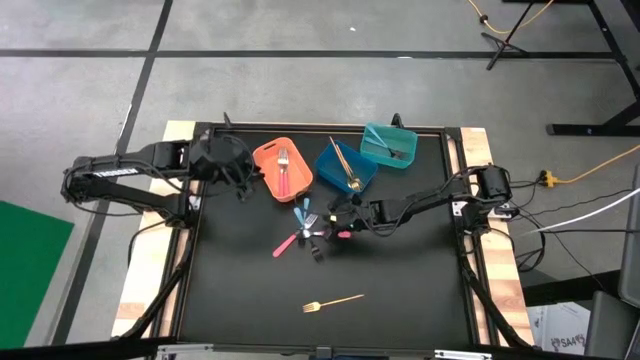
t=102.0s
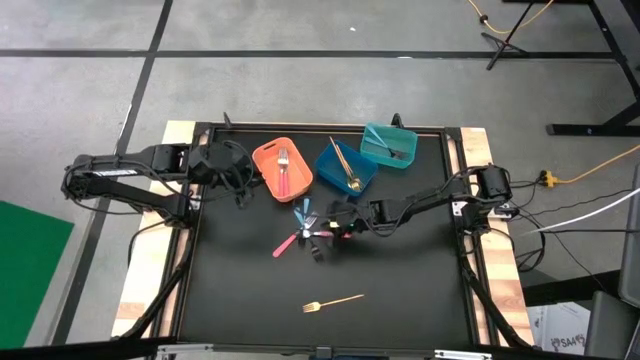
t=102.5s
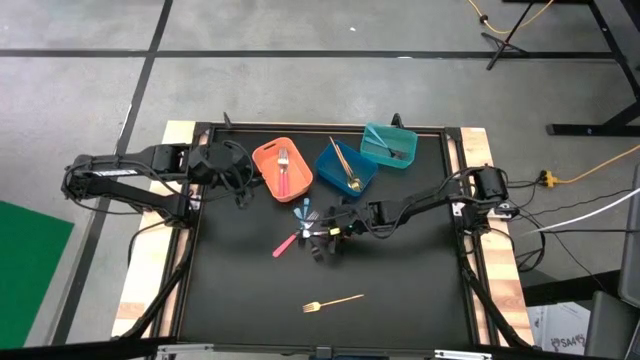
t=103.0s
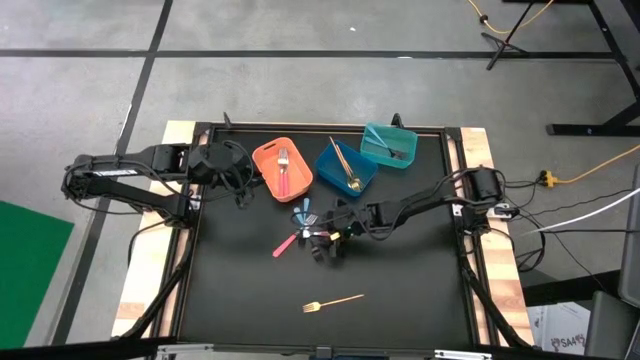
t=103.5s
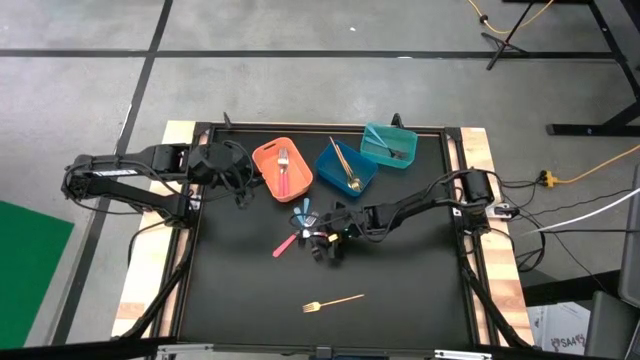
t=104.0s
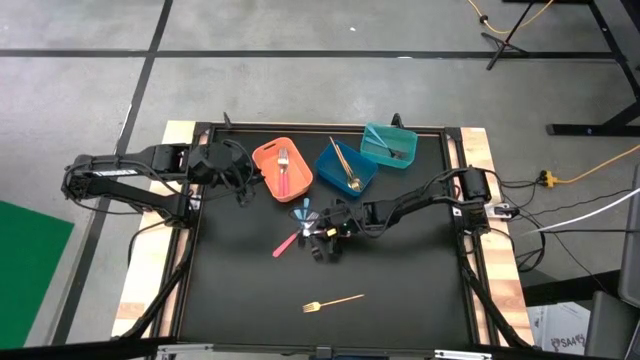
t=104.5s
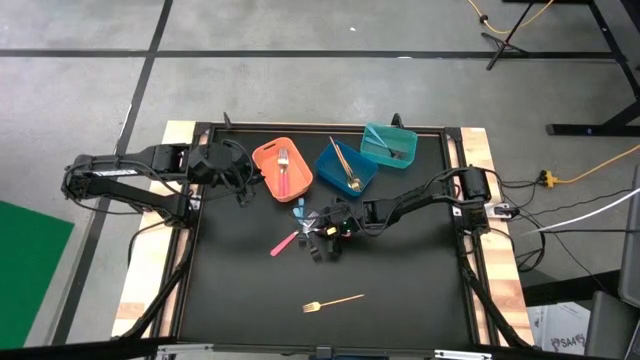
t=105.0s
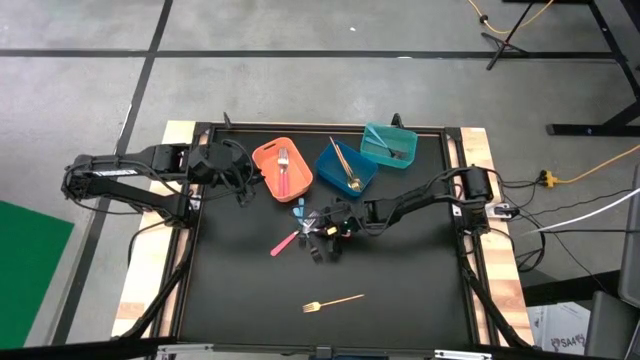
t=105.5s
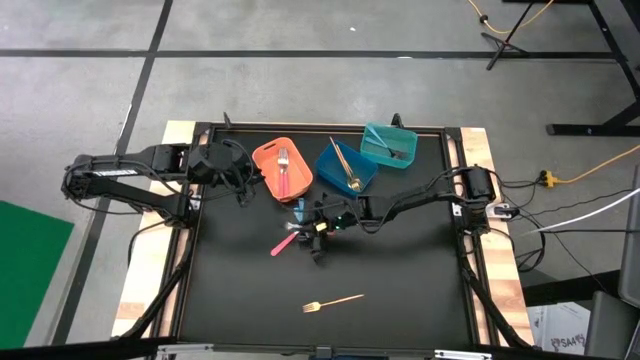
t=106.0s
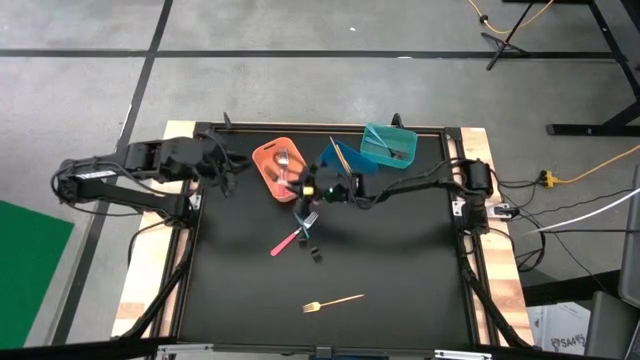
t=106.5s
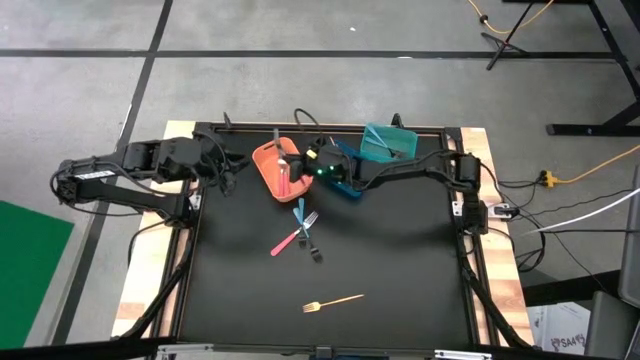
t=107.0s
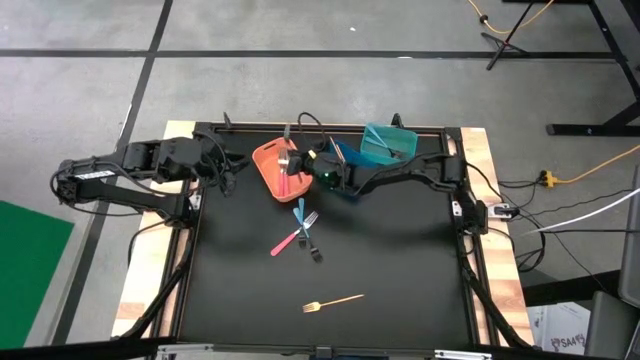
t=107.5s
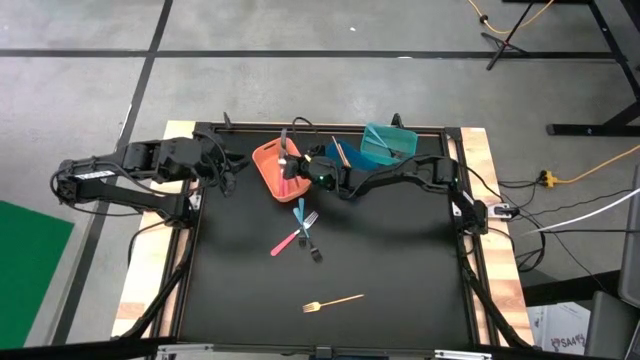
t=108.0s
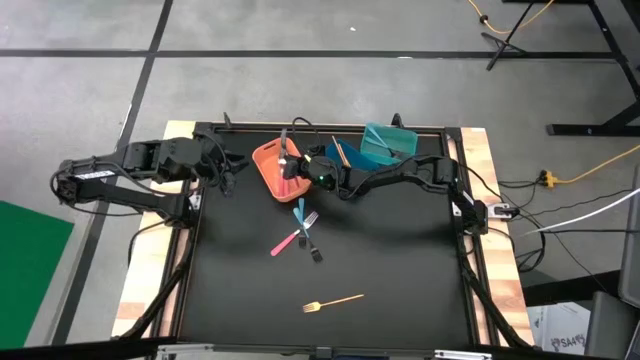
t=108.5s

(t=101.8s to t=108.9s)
Task: Sort silverware by color (type)
Put the pink fork into the orange bin

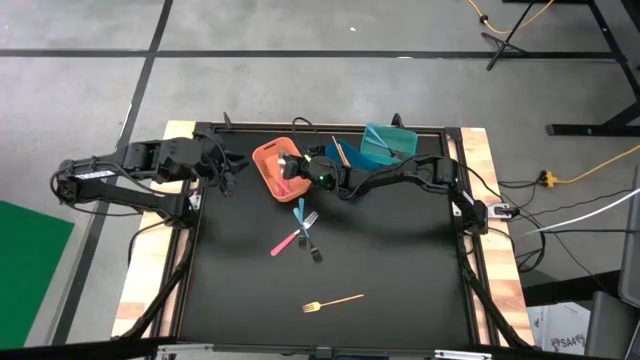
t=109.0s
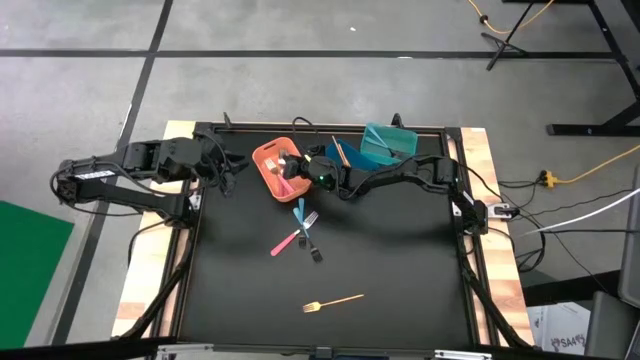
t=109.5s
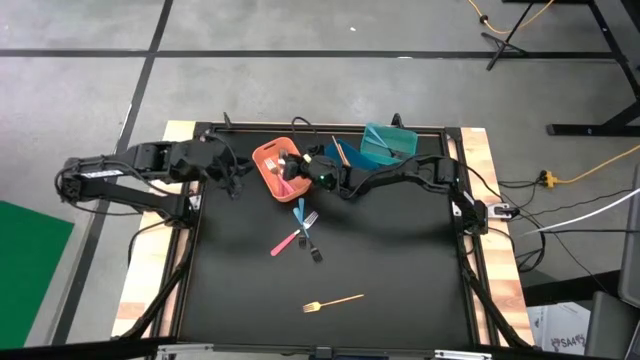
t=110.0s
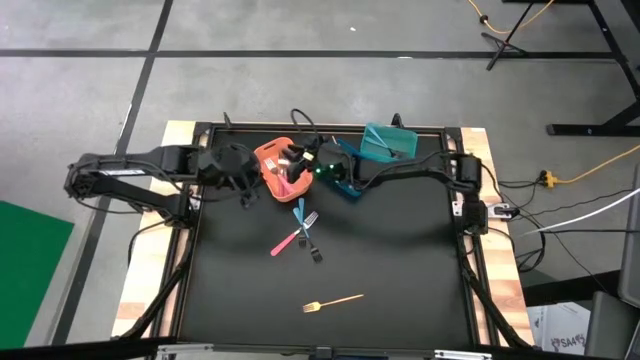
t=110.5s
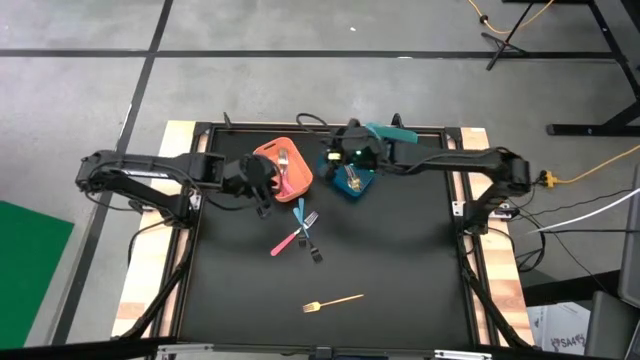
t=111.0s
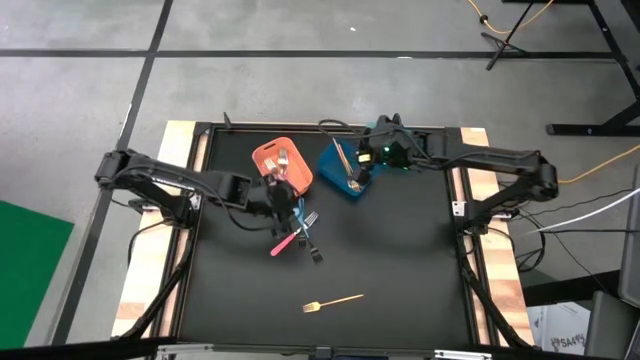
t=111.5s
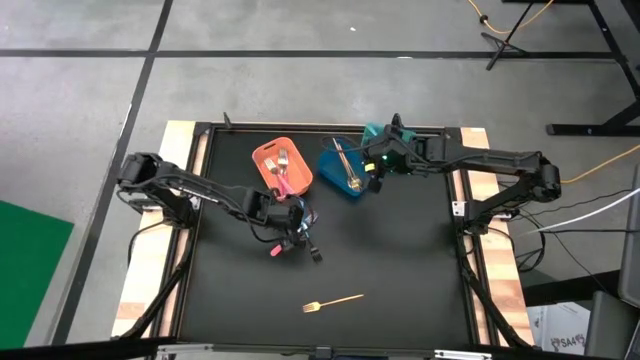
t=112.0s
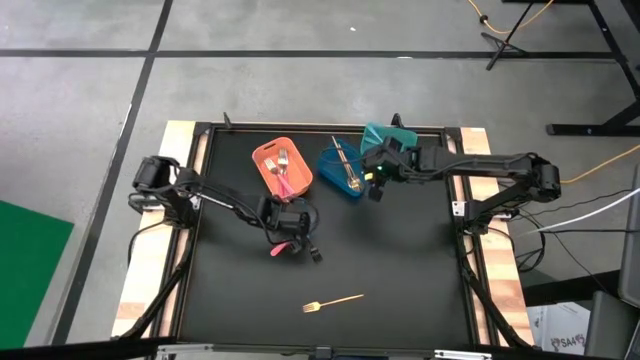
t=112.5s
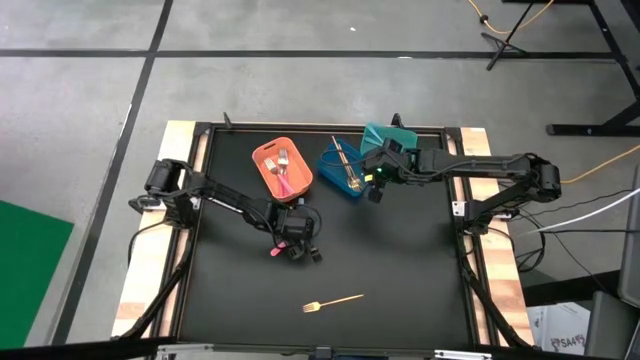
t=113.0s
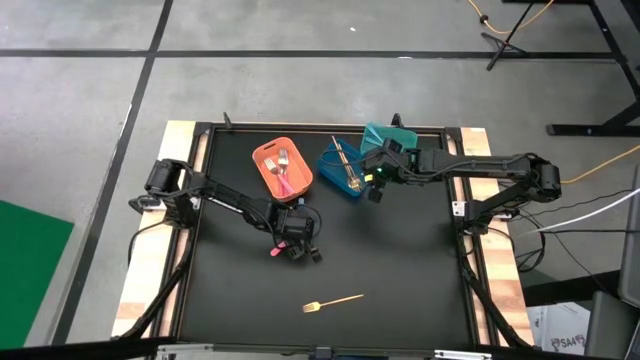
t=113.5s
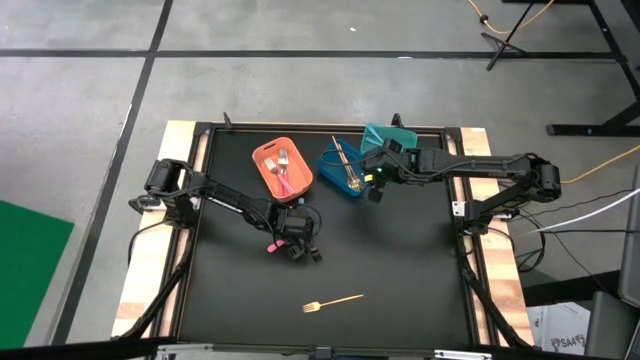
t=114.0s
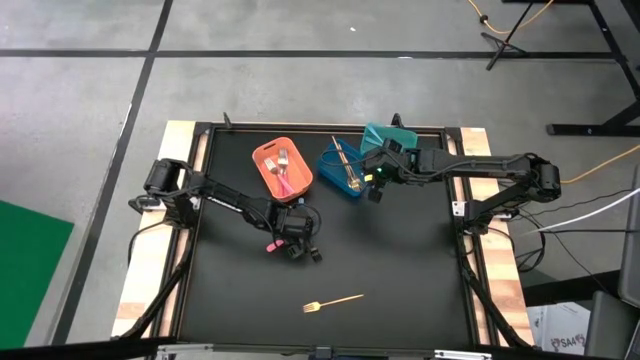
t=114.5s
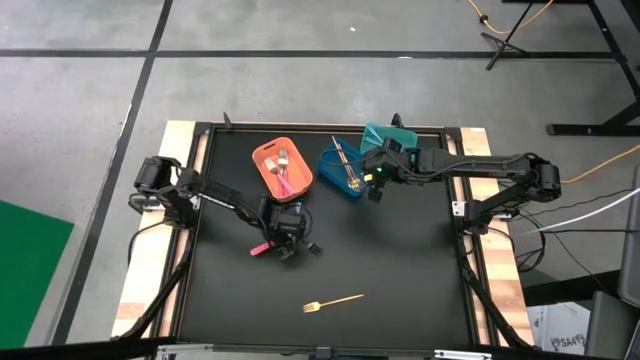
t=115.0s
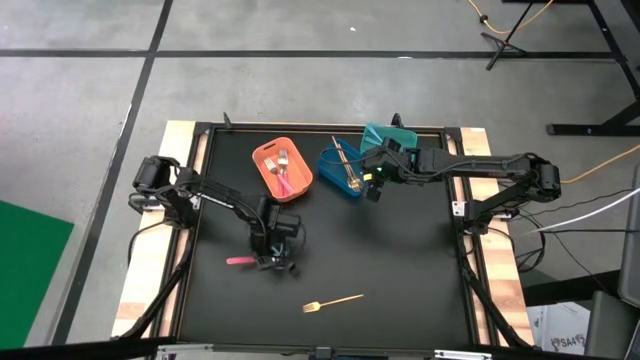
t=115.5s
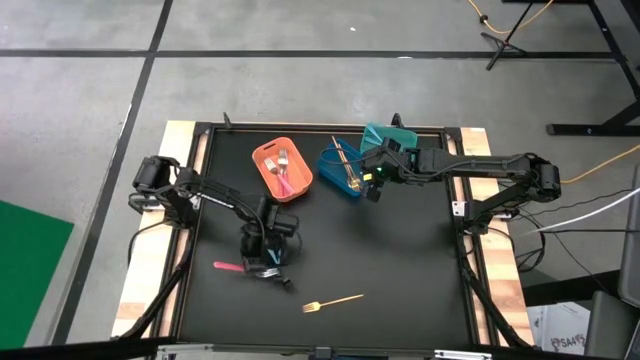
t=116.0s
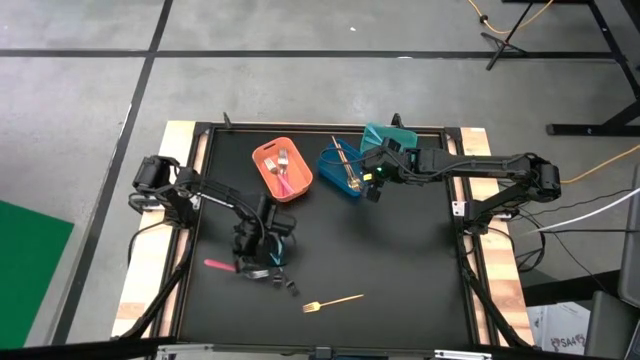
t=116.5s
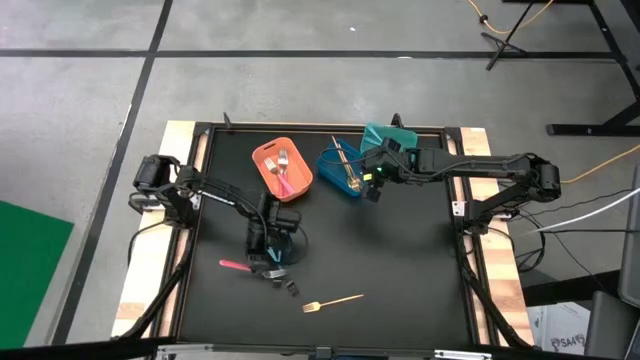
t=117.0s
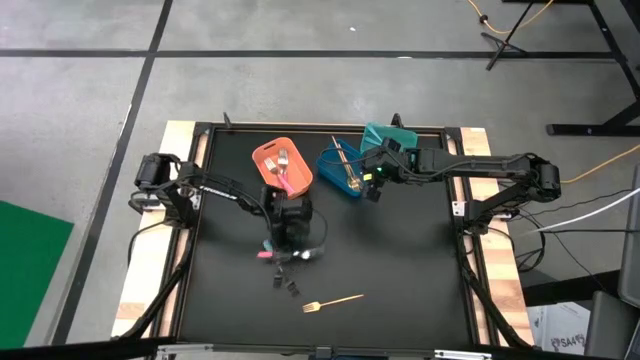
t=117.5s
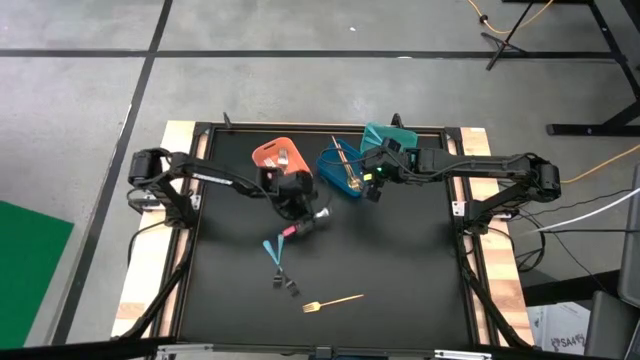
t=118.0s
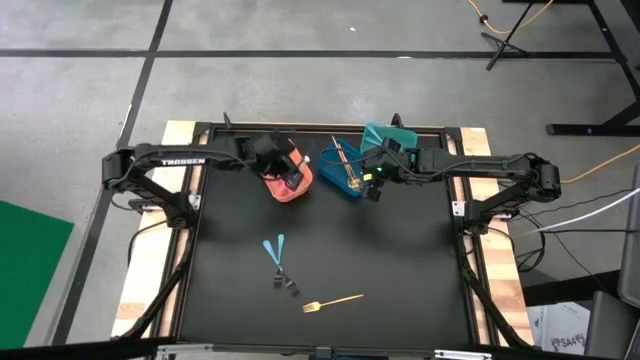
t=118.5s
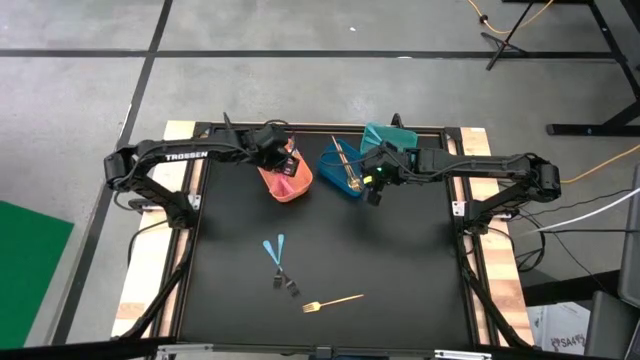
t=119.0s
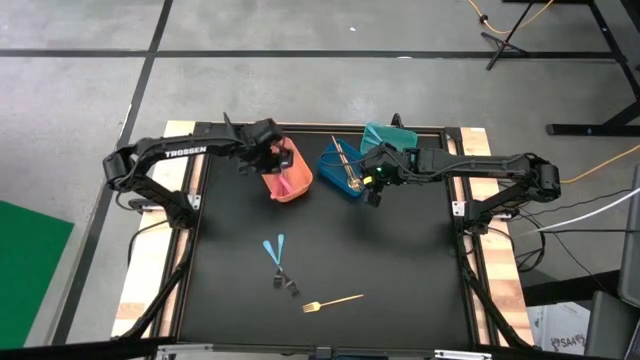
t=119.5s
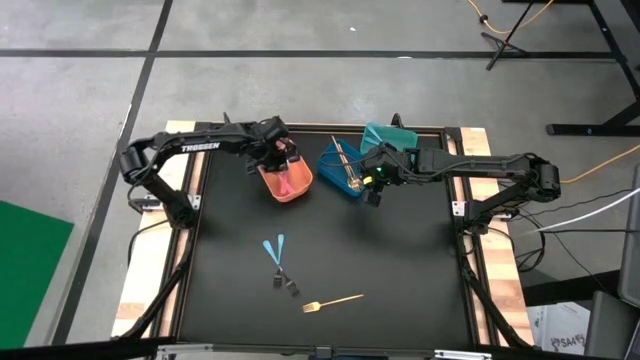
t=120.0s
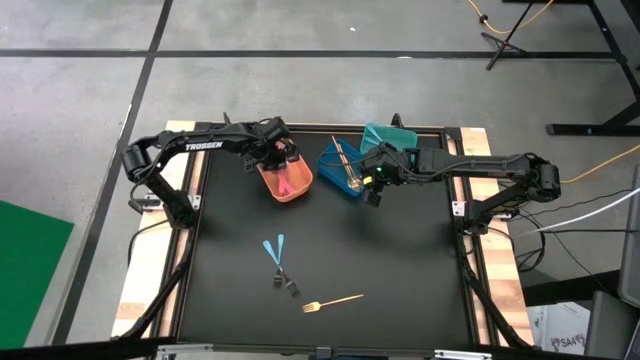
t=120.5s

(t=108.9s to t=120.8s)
Put the pink fork into the orange bin

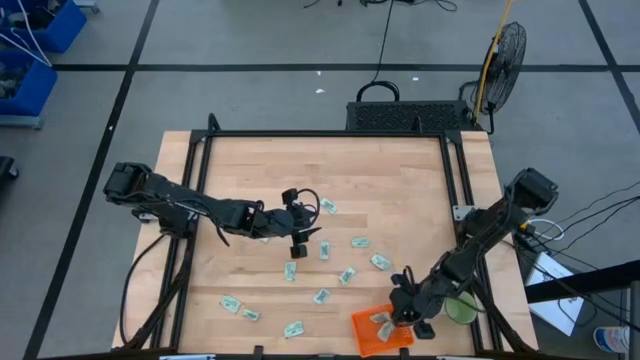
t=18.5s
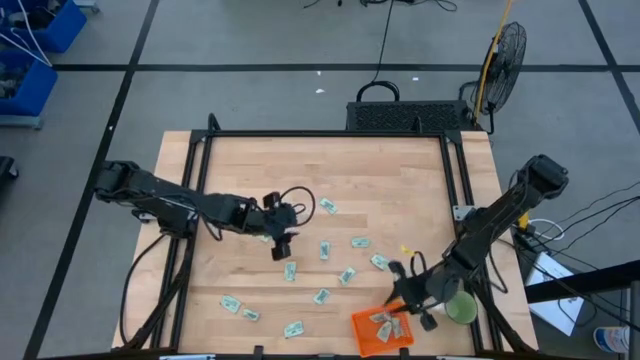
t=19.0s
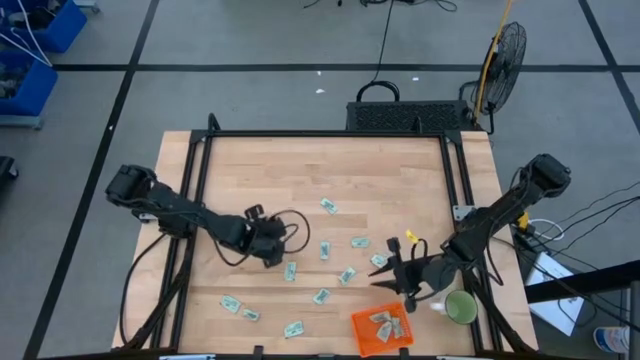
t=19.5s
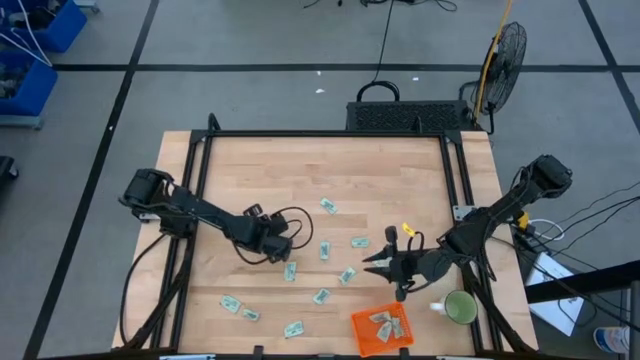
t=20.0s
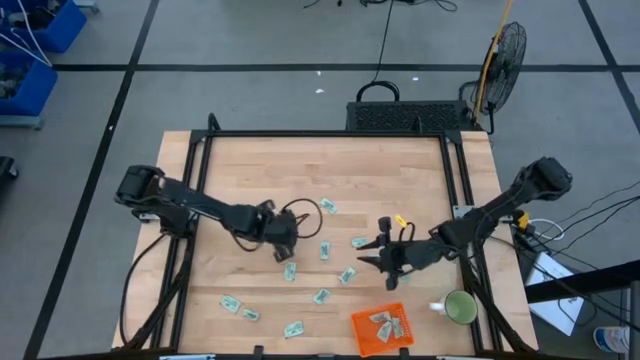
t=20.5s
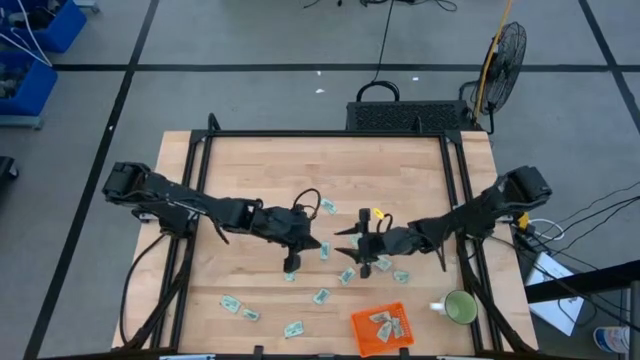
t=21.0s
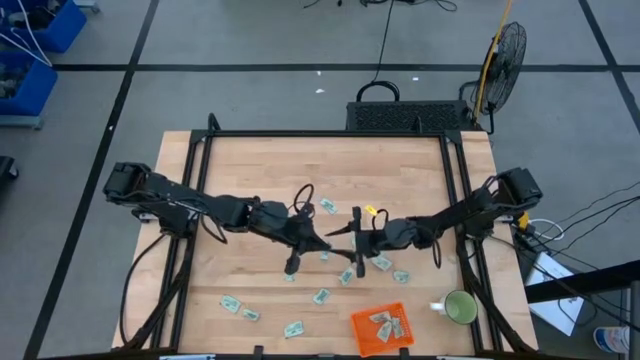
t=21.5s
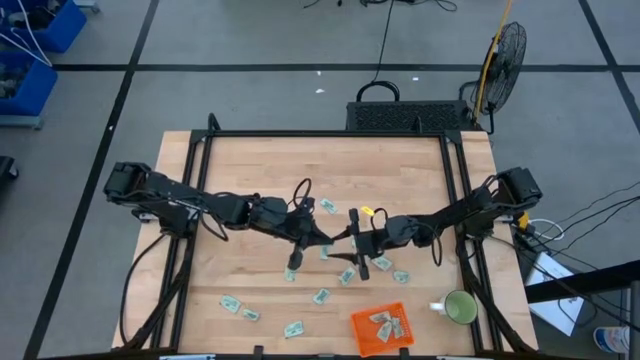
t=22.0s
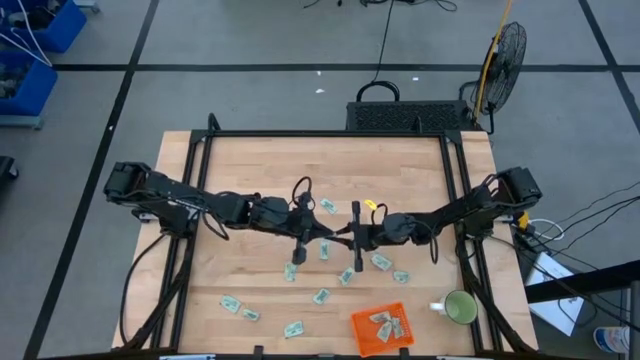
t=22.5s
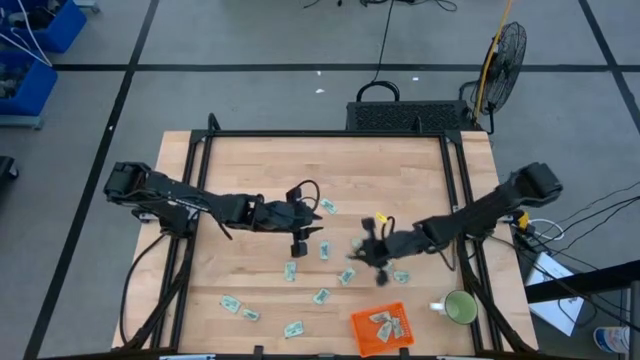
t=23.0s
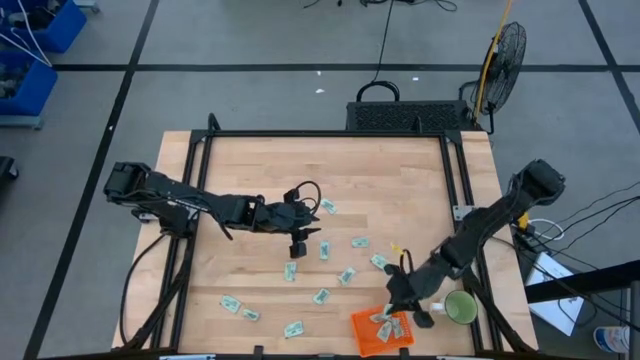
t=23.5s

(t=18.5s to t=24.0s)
Task: Pick and place Stevia / Truvia into bins
Put the stevia packet into the orange bin
